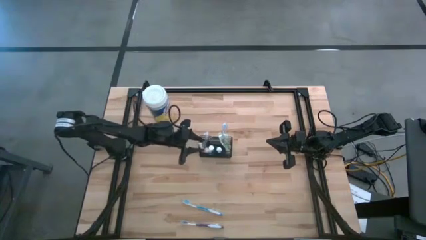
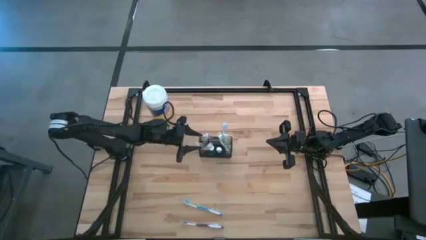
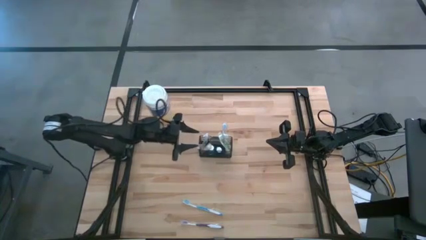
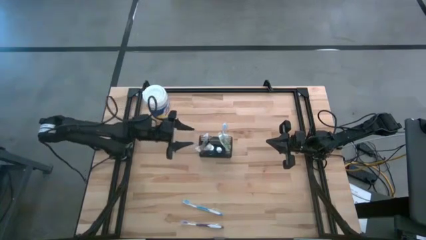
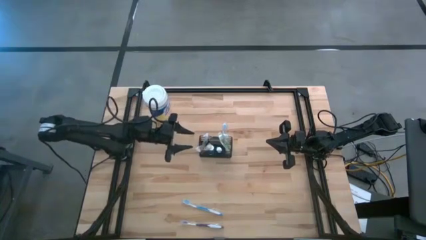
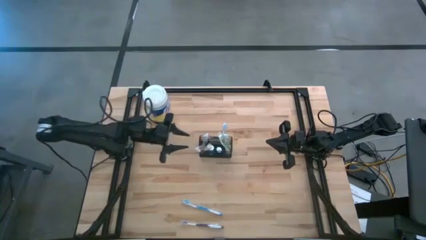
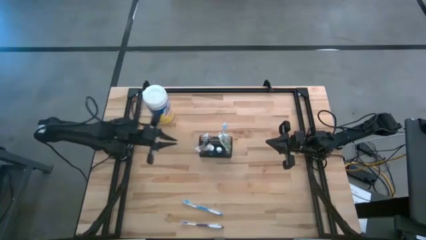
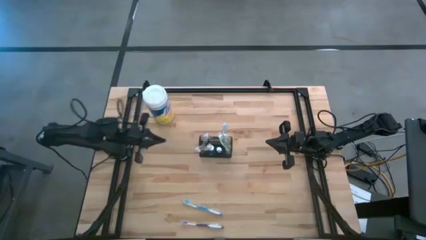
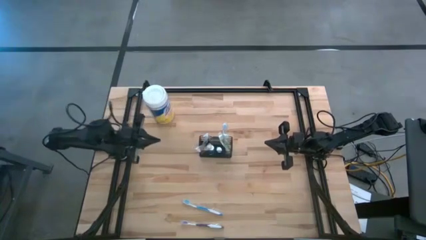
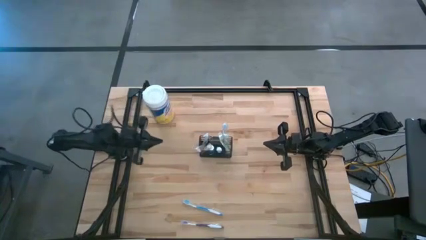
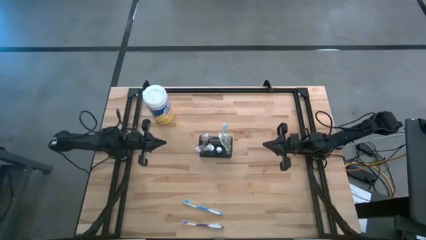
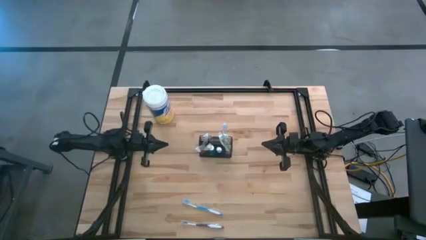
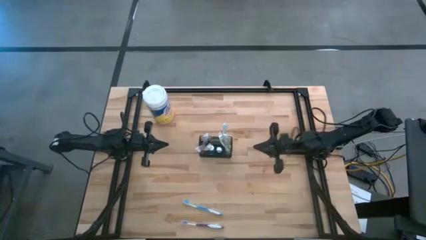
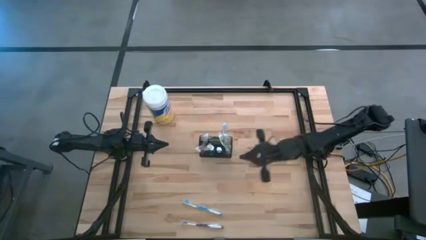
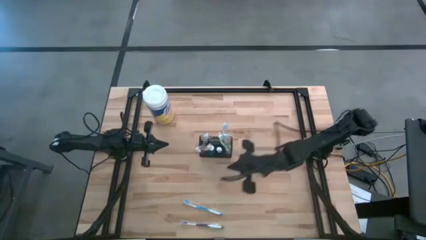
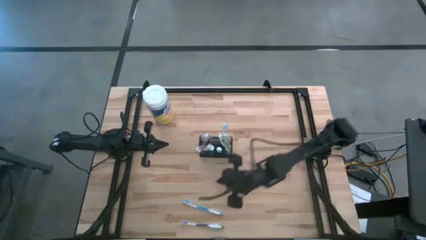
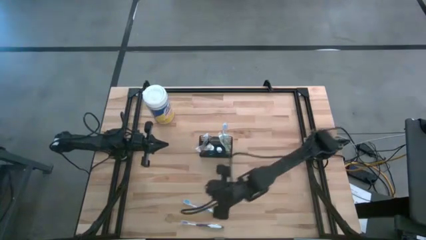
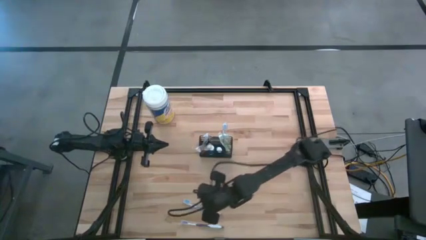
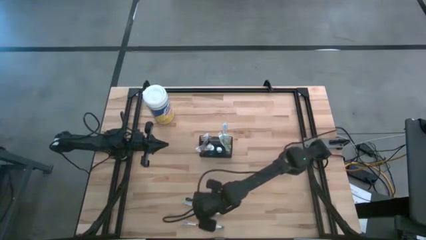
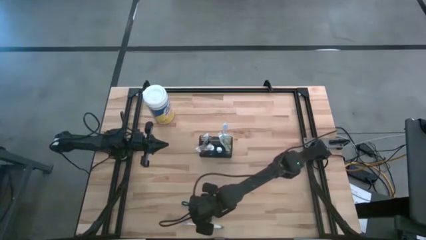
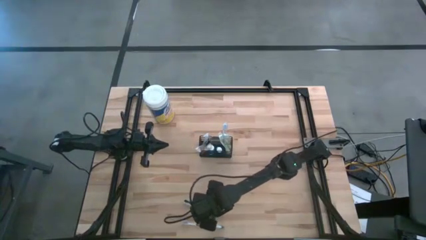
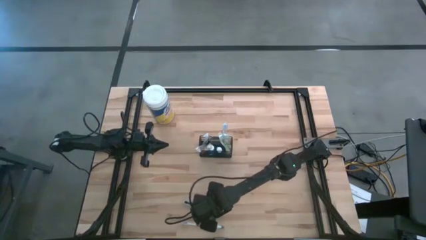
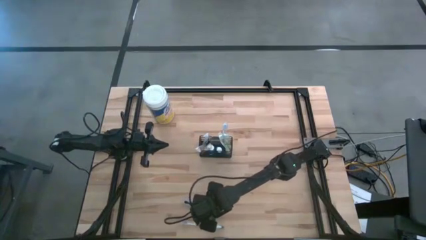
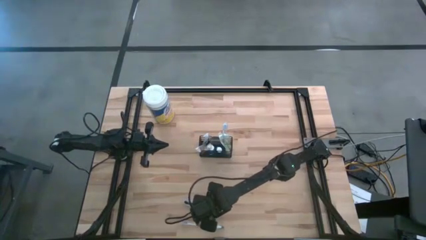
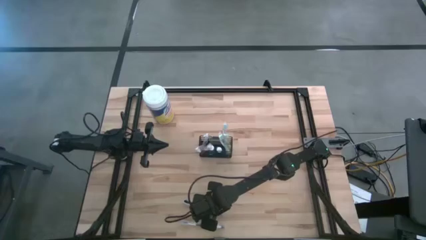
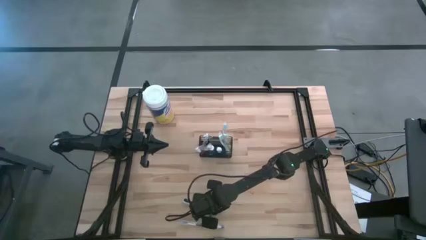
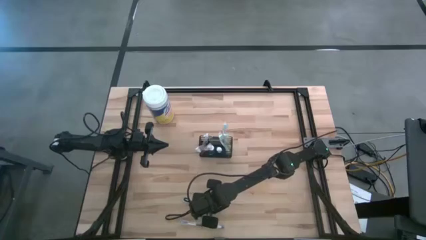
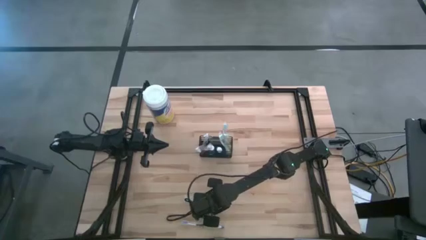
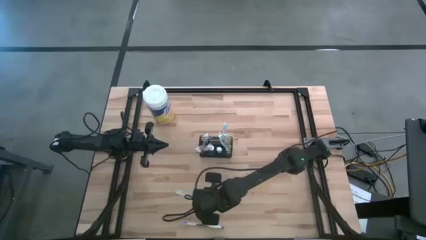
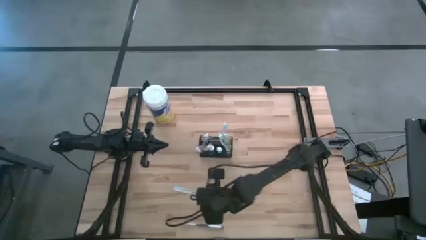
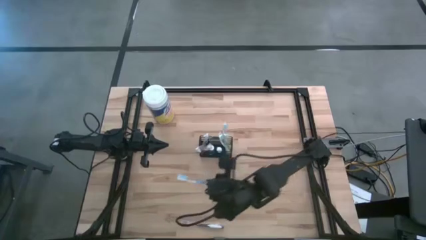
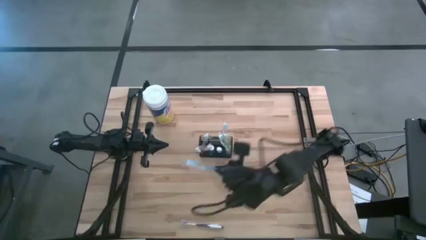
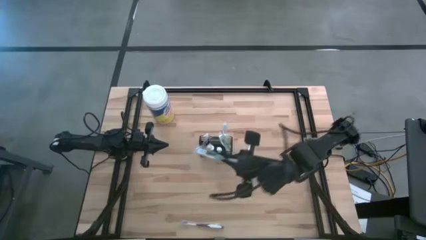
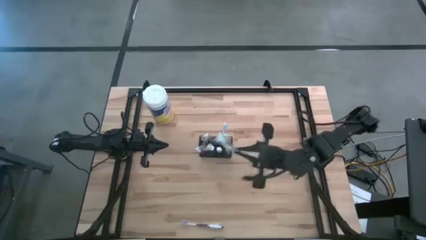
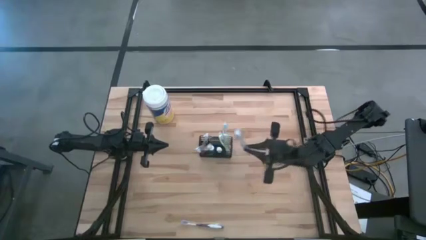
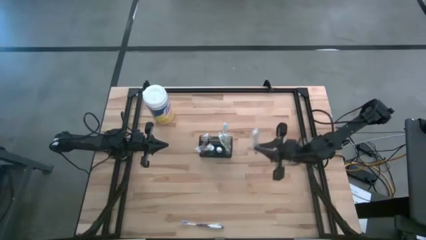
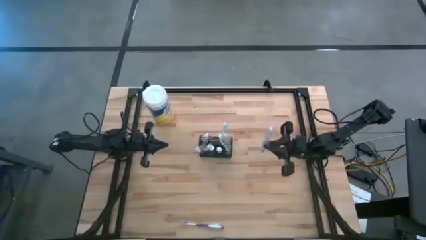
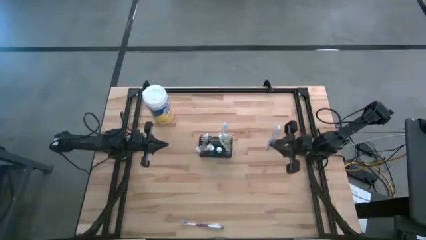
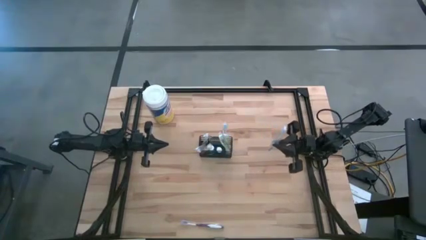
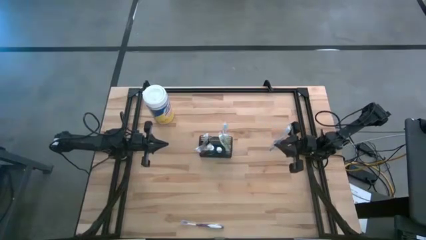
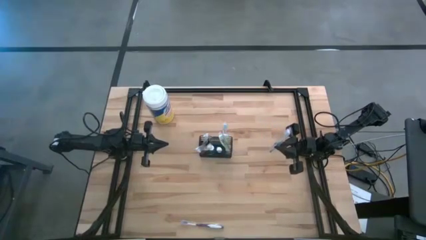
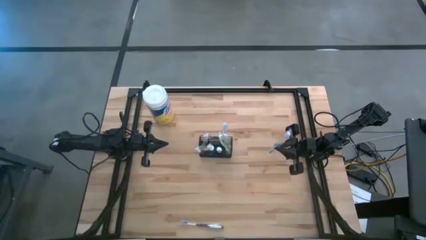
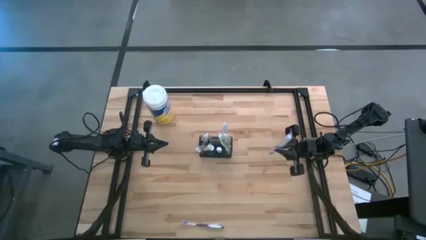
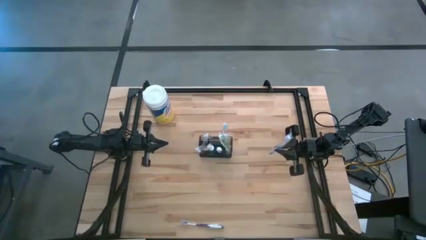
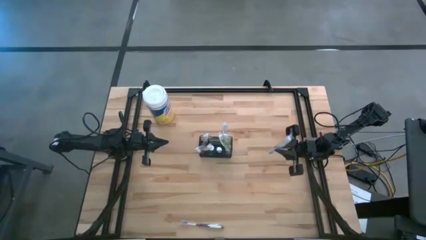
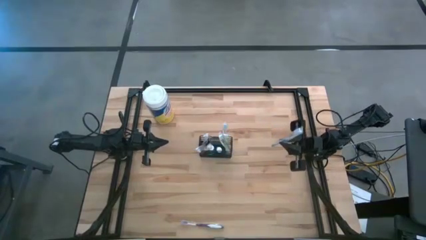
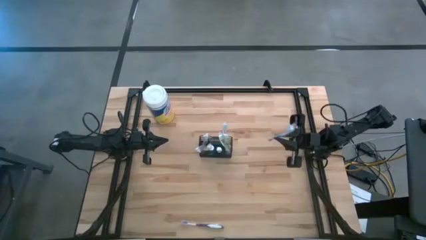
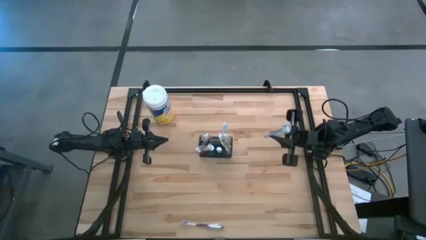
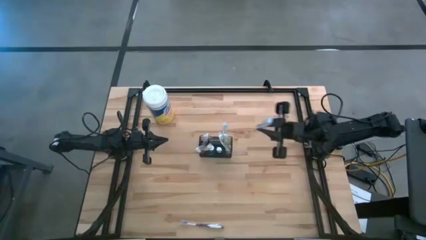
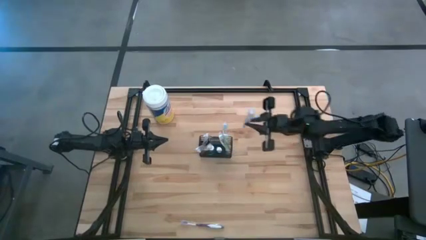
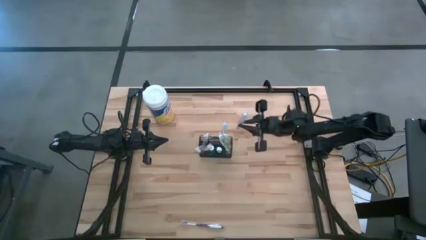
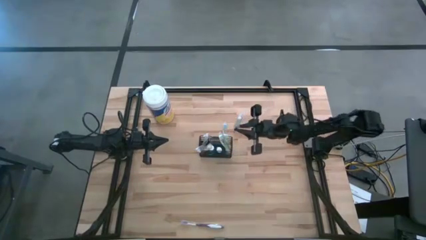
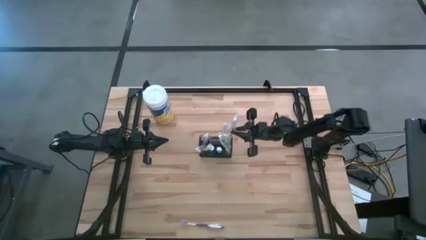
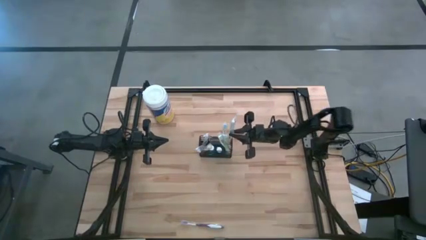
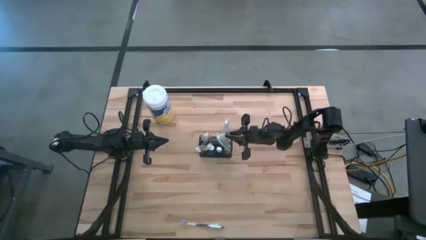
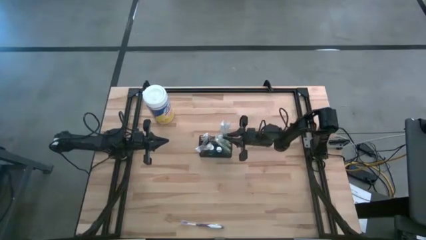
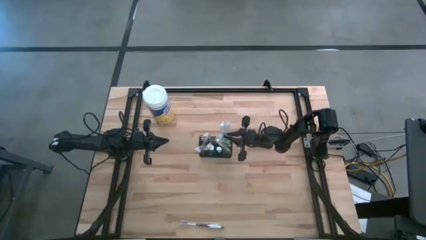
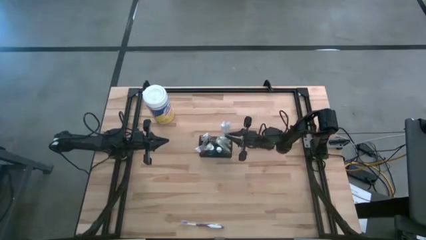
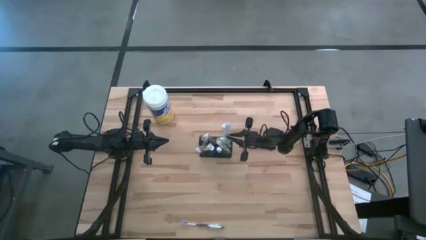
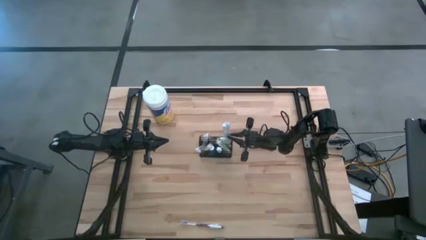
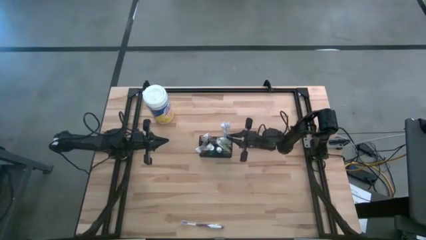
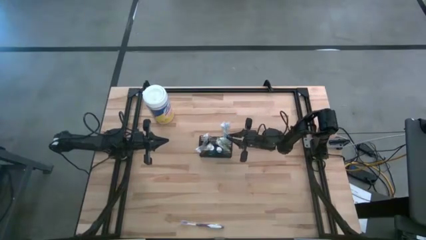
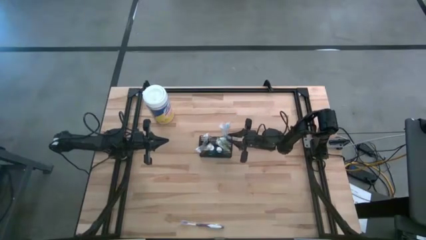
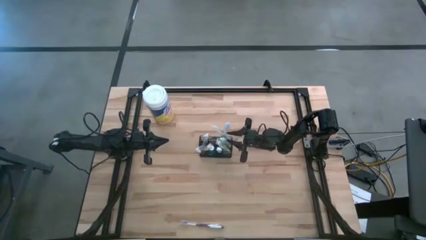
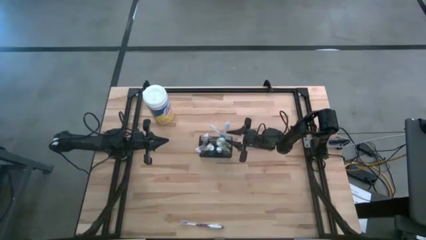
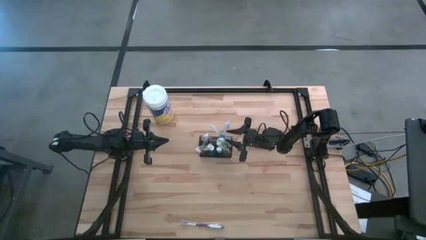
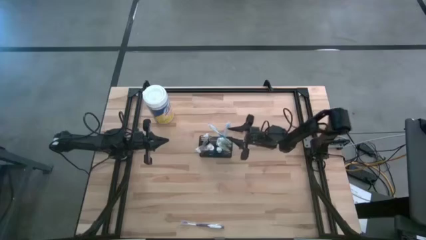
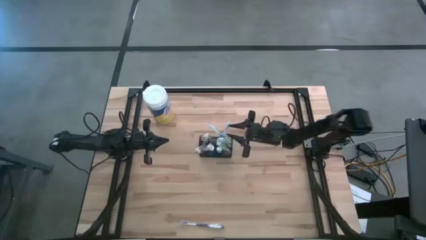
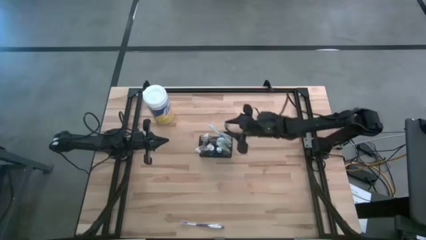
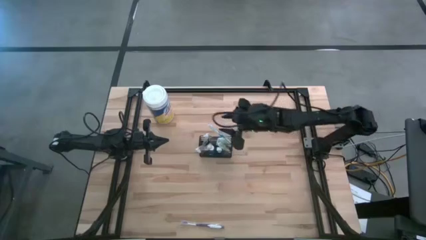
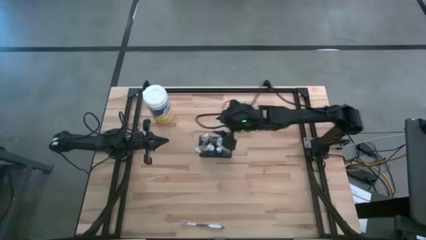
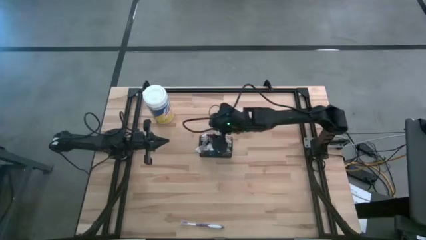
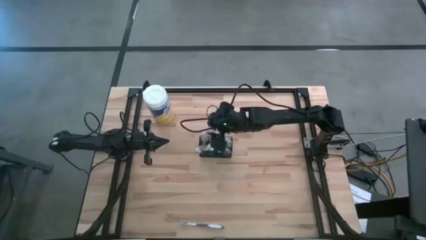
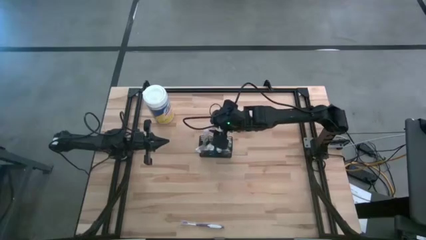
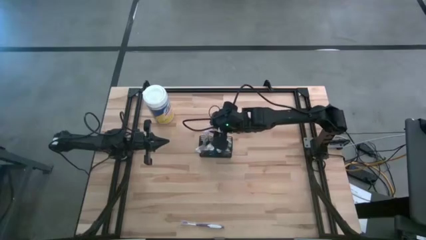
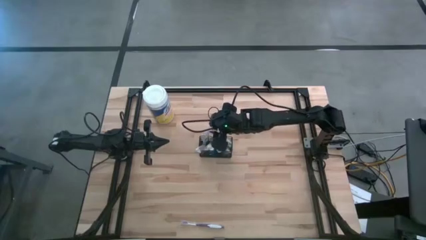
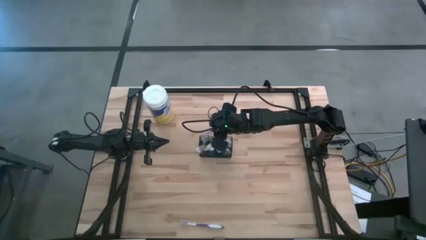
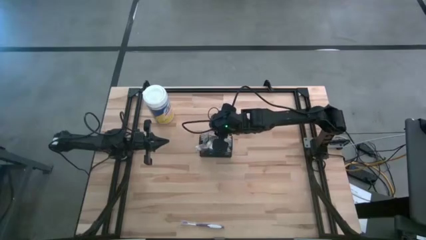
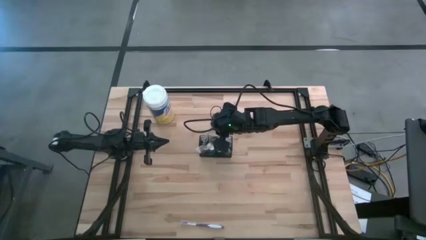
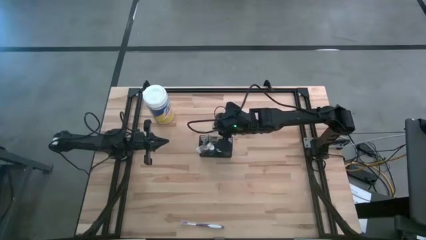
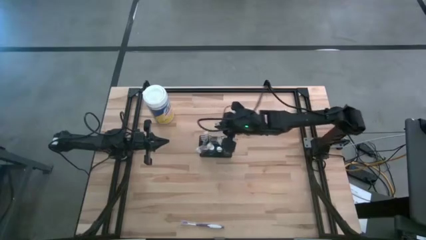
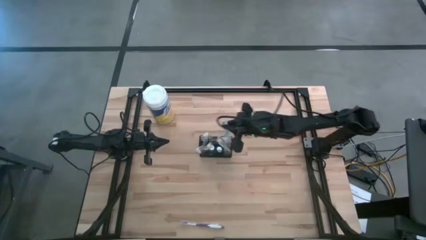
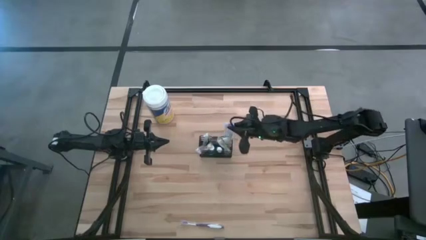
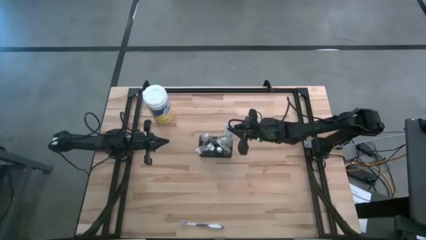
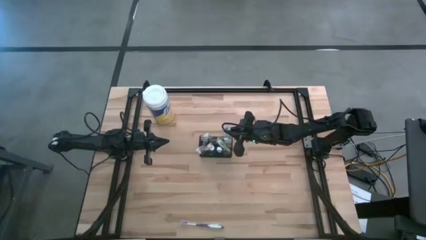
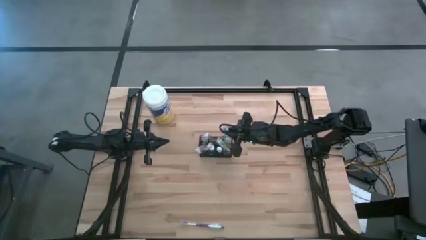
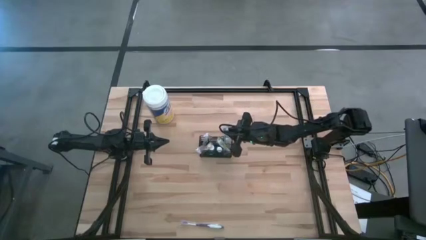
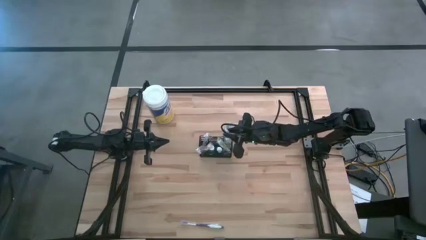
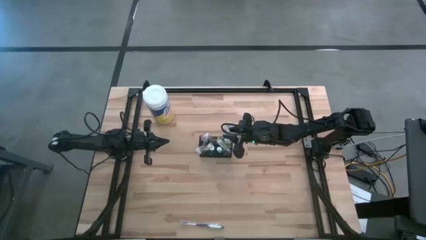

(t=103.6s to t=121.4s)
Task: Pick & Place toothbrushing station
Put the blue toothbrush into the wire organizer
